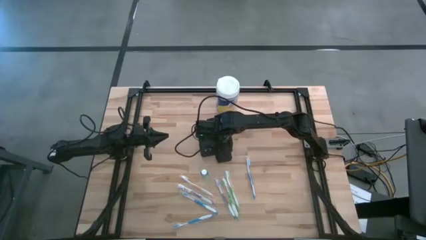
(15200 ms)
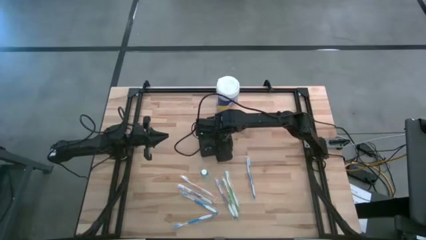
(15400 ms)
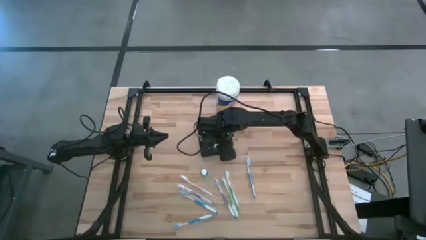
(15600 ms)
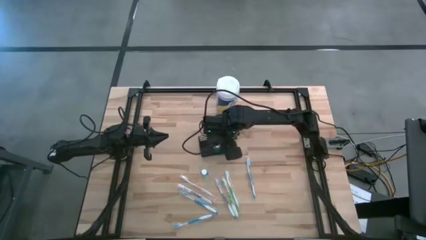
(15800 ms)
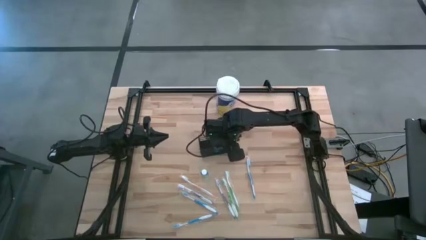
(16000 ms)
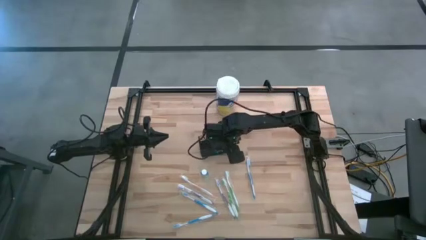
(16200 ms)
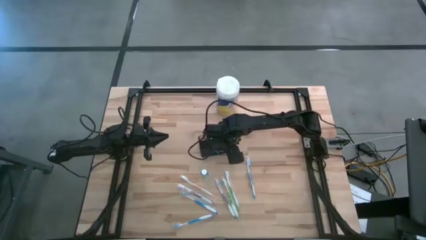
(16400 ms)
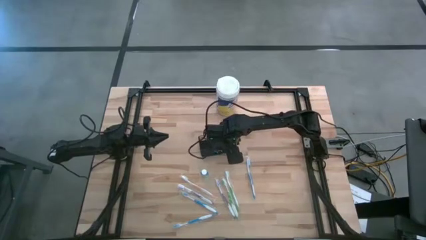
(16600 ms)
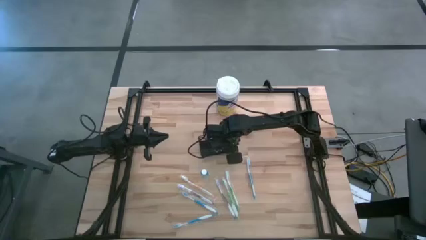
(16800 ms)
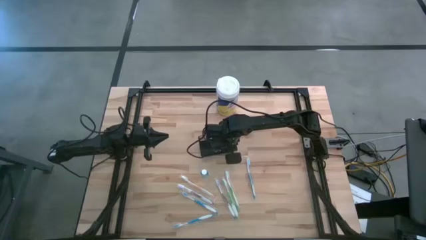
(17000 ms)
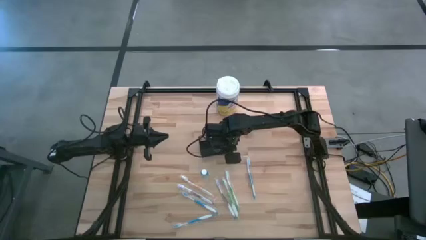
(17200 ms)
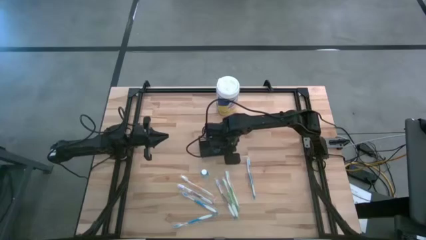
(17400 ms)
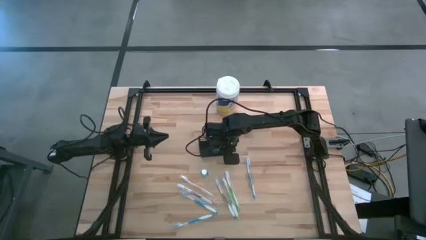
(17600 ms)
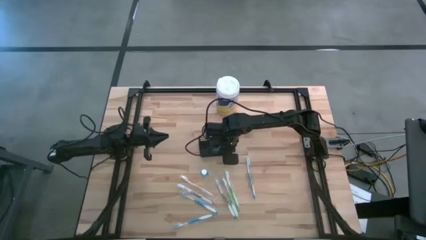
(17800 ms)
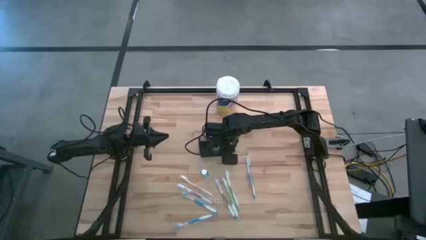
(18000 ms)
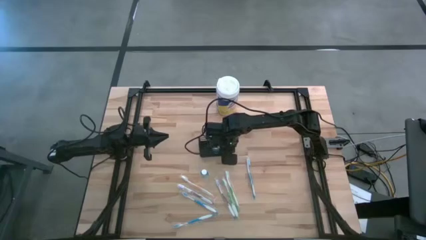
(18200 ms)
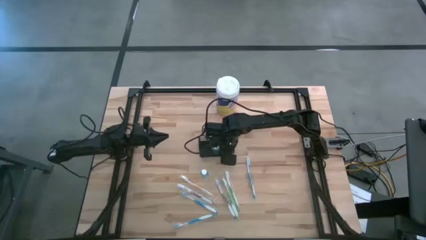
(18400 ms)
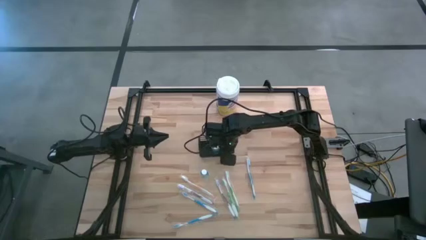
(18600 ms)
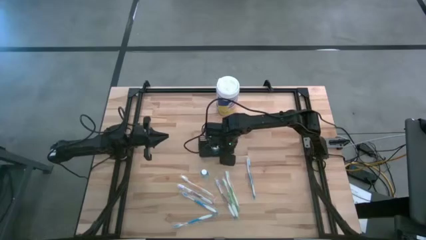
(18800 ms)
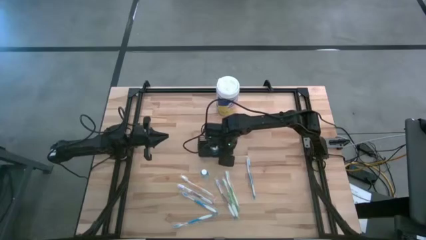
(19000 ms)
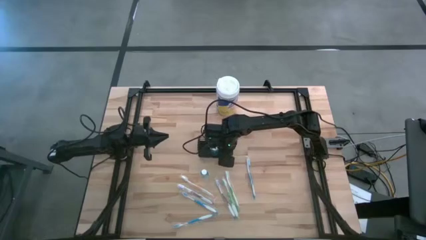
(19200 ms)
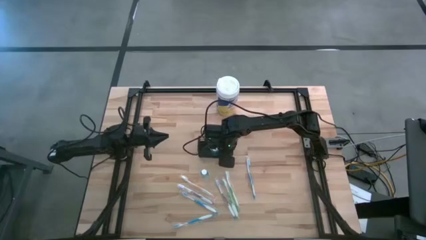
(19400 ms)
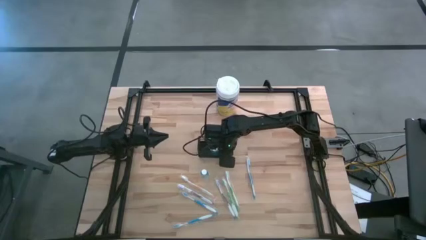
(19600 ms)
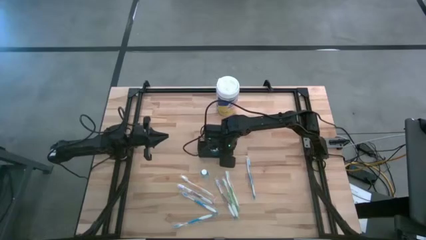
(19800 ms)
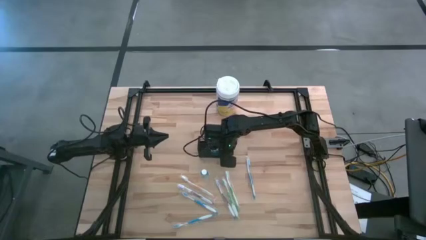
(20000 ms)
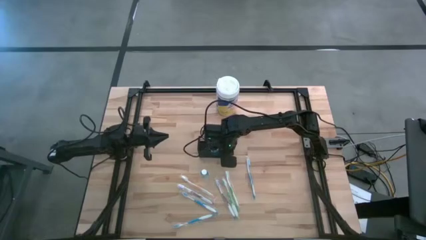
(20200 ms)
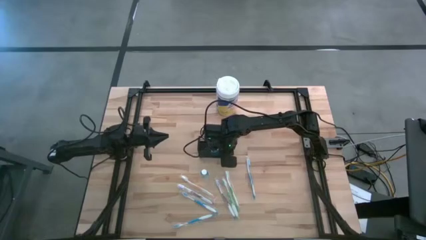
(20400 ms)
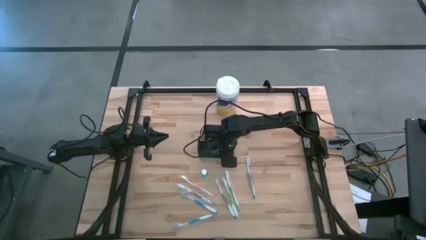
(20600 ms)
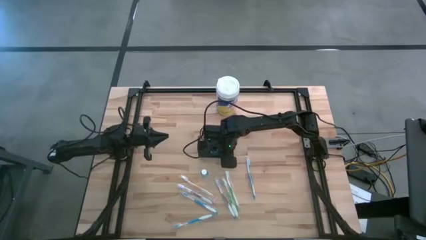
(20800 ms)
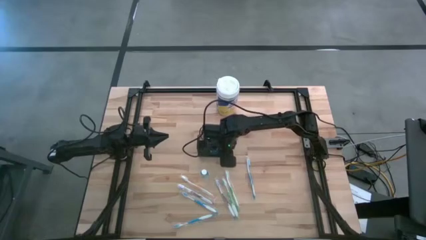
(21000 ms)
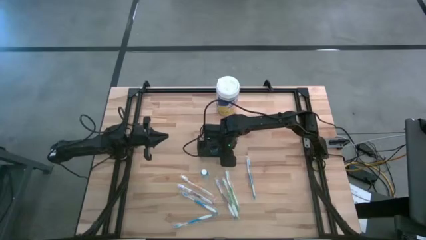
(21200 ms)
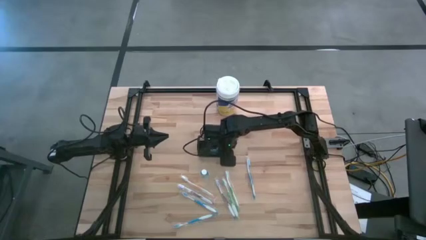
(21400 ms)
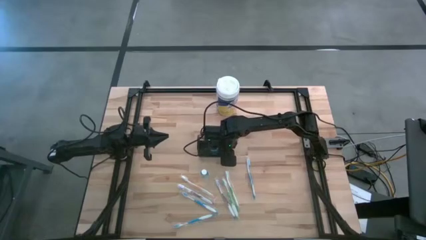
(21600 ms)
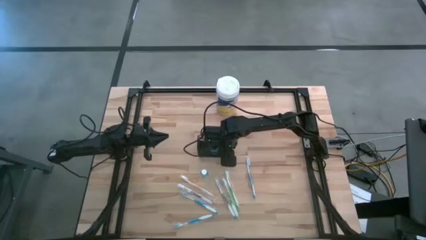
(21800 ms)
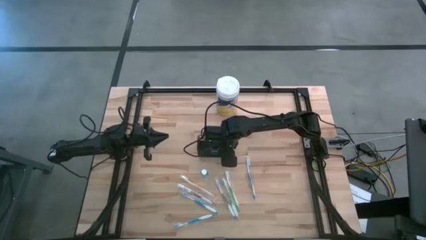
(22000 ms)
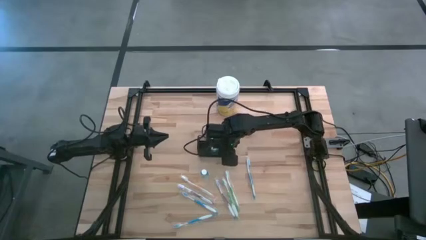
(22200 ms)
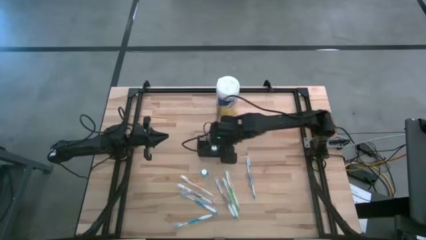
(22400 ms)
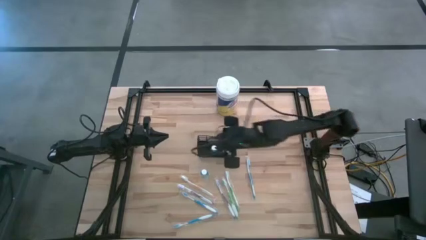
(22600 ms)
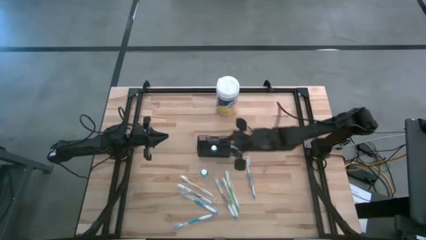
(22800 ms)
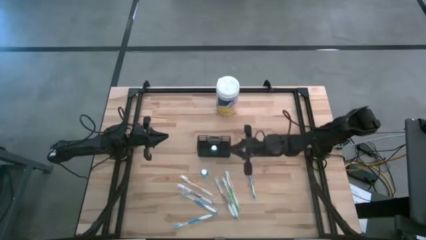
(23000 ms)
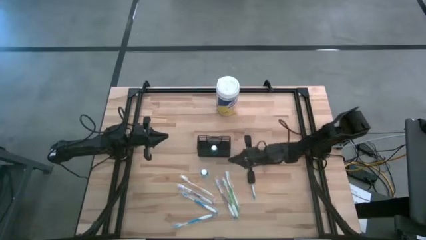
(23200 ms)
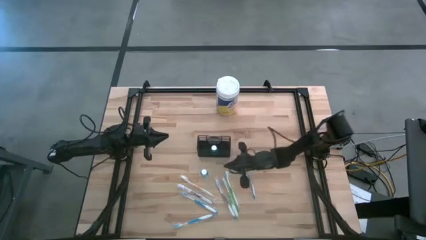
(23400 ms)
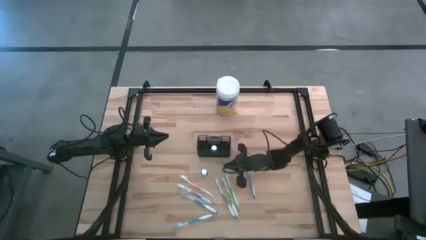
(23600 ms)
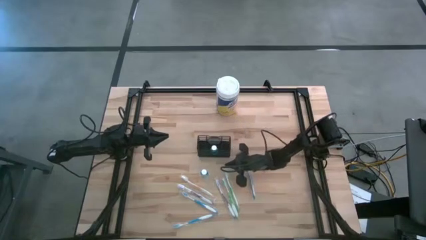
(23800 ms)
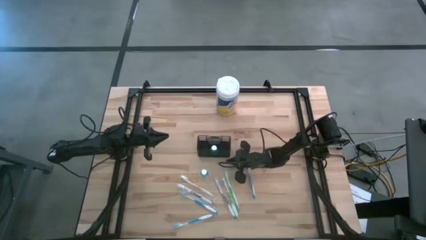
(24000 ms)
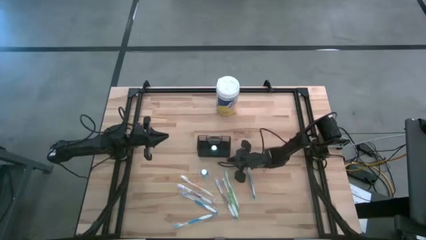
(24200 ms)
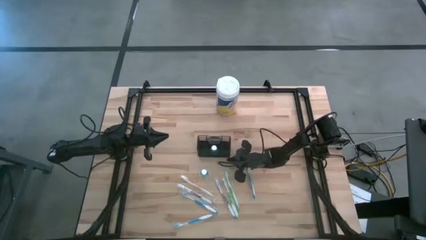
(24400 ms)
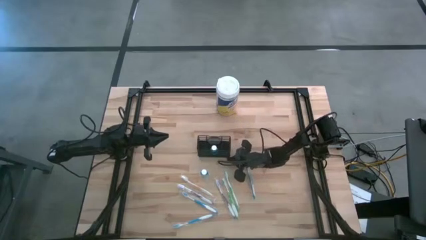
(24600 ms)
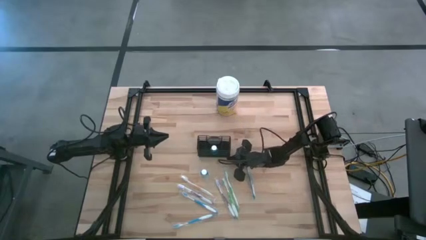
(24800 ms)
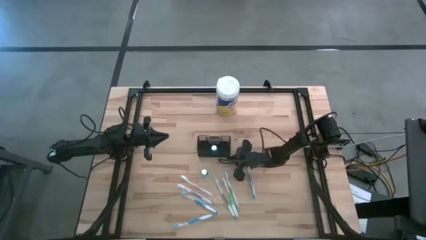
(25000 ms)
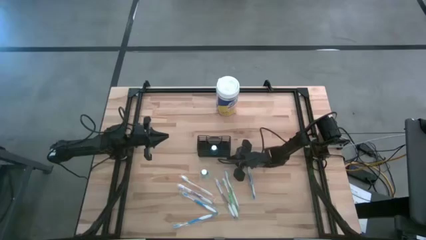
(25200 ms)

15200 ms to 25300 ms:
Task: Pick & Place toothbrushing station
Adjust the black wire organizer
